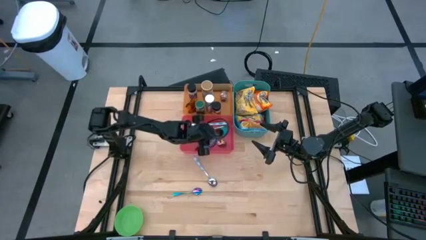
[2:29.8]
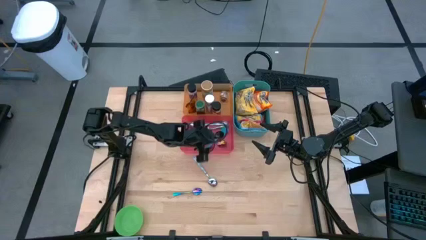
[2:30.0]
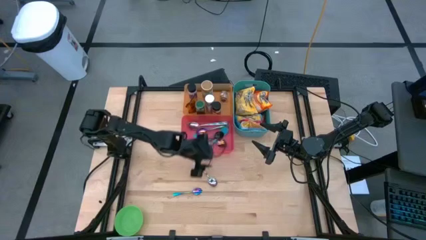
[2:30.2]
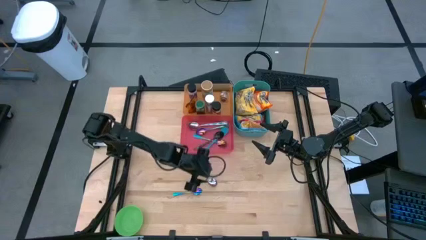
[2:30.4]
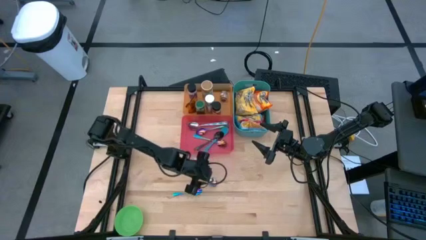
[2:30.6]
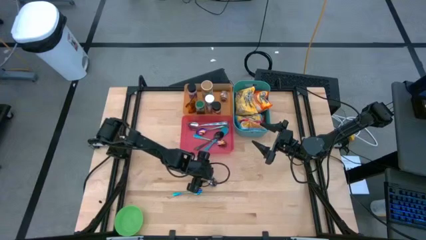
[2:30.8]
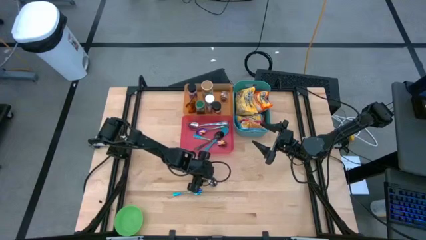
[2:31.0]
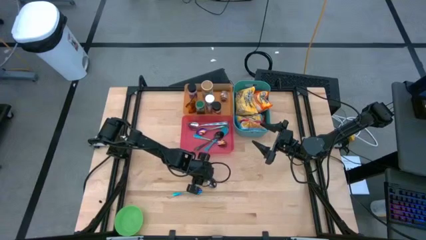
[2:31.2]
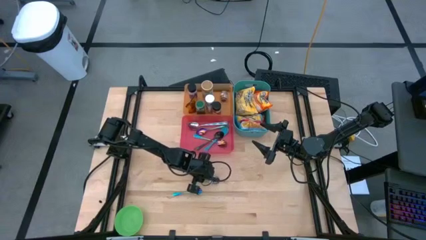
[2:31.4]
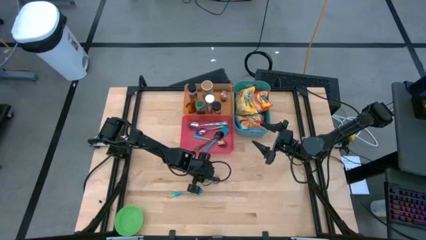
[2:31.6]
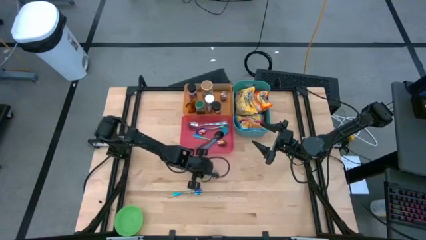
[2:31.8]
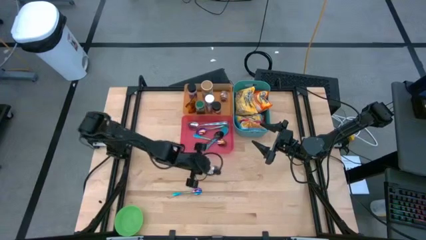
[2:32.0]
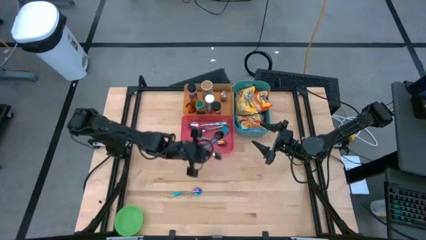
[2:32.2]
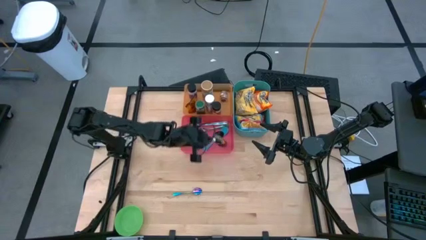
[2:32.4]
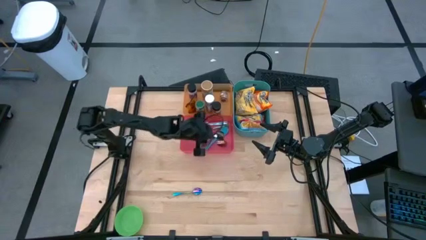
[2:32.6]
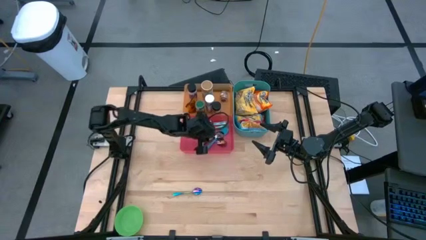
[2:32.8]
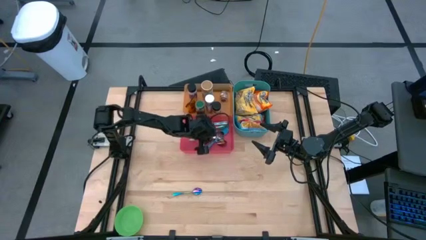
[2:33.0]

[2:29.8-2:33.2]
Task: Pick & Place Food Item
Put the blue patterned spoon into the red bin

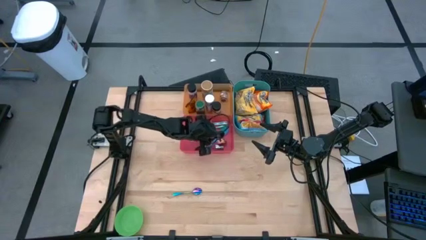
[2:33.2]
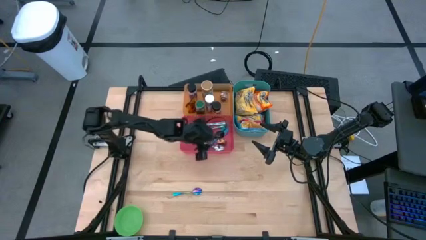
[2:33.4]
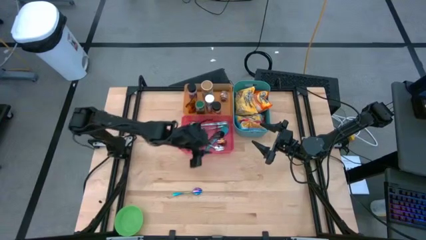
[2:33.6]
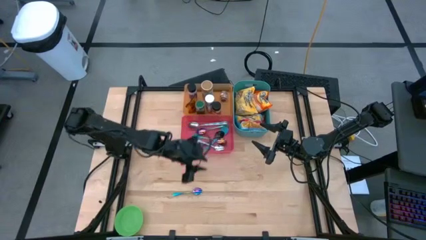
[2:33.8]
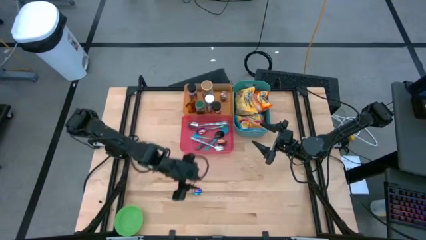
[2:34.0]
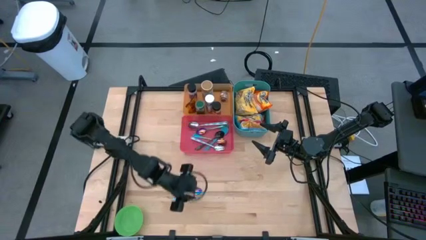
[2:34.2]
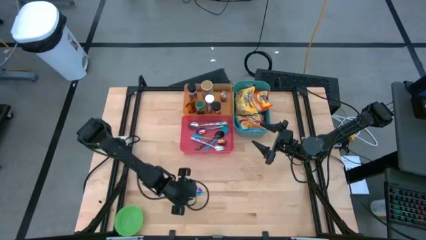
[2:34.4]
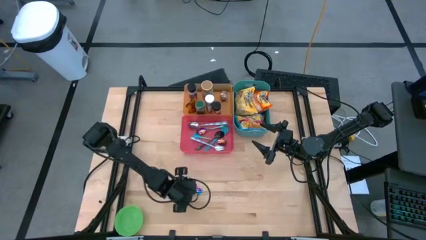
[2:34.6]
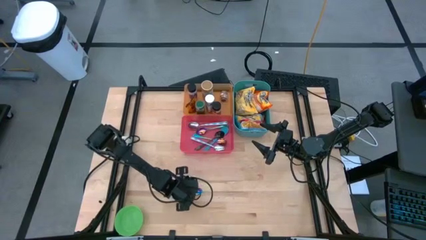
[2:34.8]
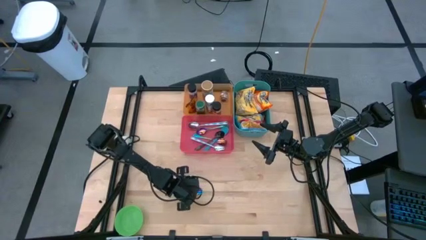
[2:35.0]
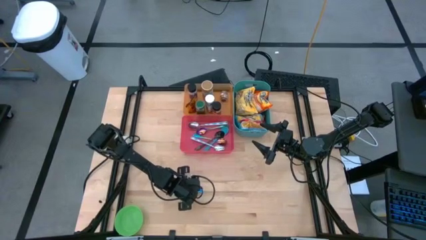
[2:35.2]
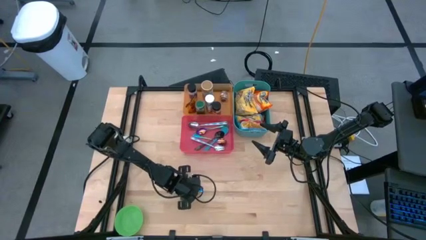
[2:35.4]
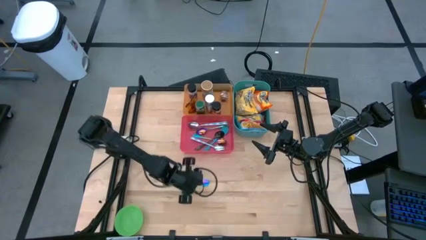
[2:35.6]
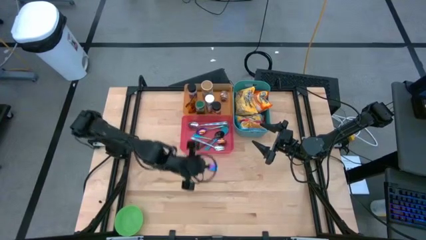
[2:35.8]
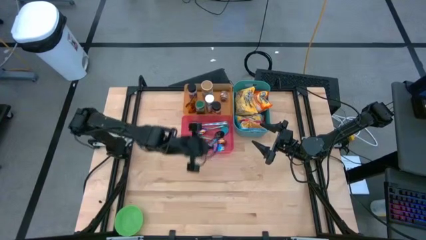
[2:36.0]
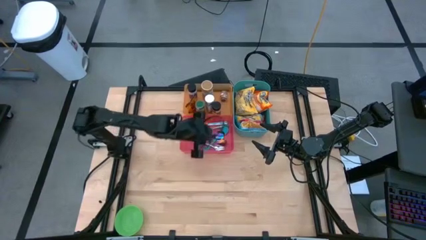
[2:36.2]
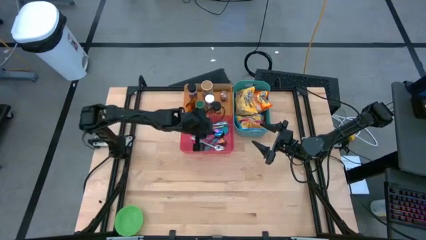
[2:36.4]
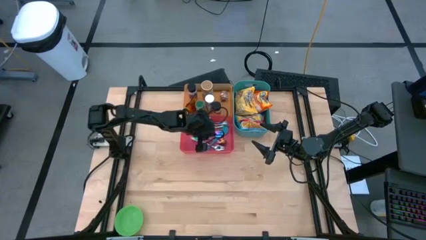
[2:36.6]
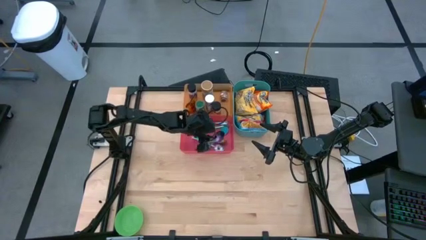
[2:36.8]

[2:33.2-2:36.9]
Put the blue spoon into the red bin

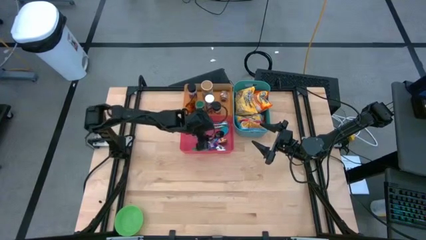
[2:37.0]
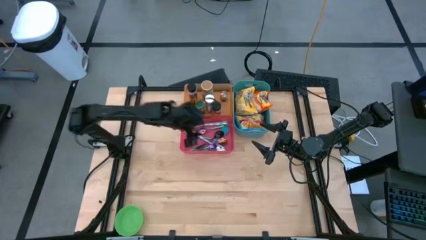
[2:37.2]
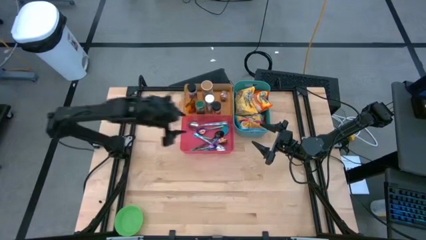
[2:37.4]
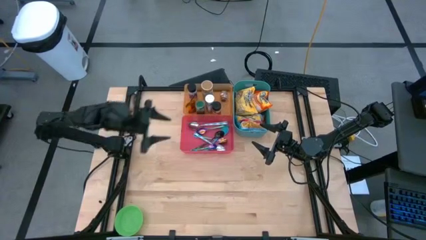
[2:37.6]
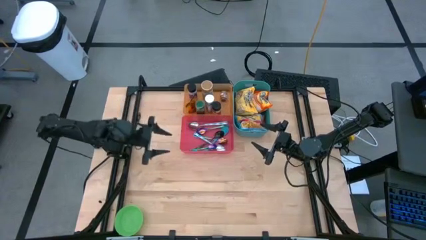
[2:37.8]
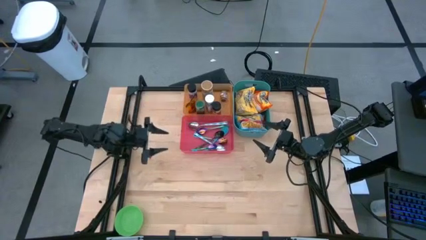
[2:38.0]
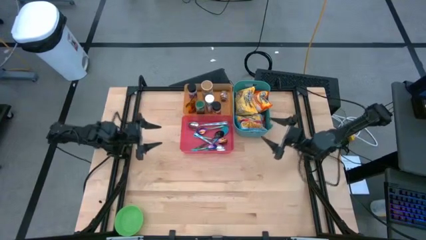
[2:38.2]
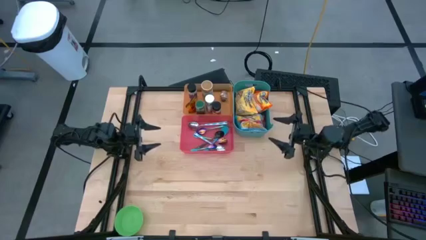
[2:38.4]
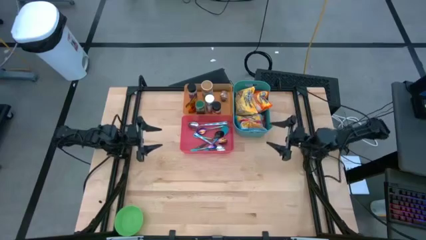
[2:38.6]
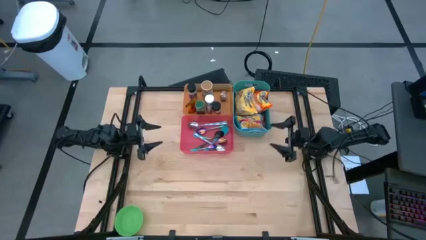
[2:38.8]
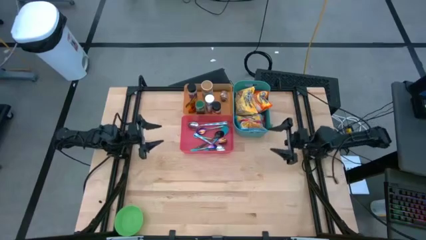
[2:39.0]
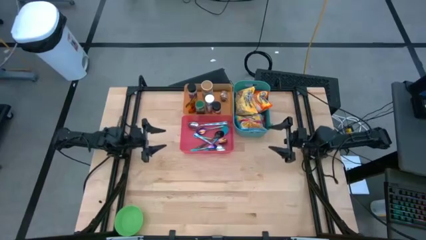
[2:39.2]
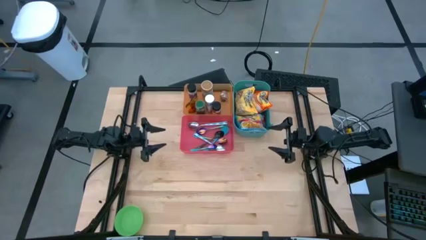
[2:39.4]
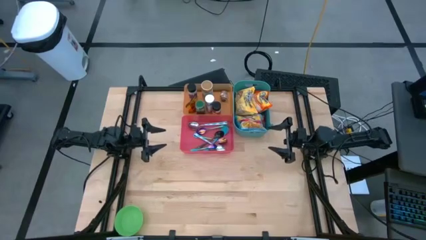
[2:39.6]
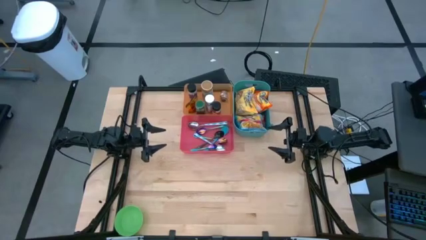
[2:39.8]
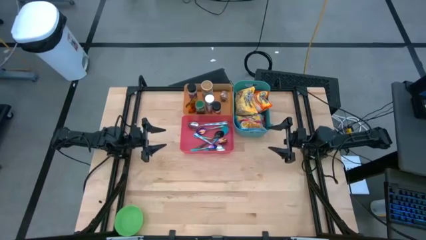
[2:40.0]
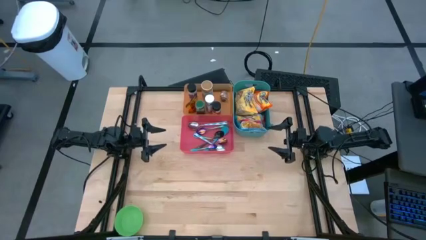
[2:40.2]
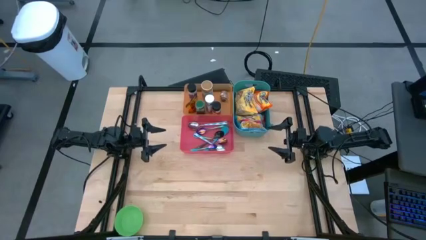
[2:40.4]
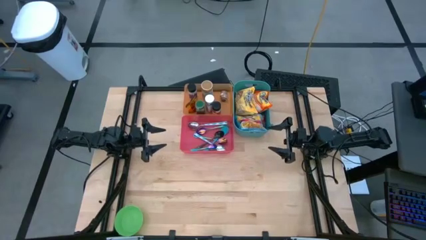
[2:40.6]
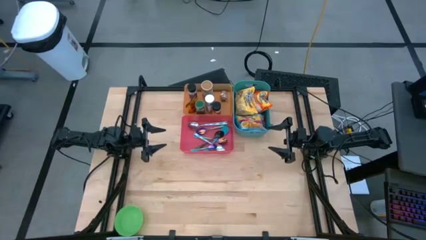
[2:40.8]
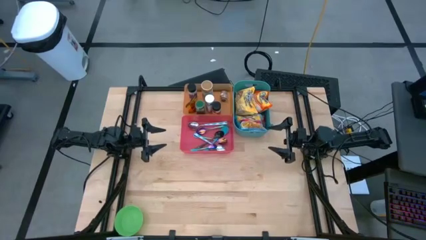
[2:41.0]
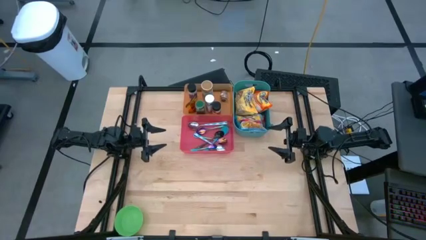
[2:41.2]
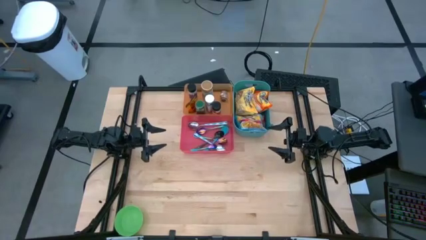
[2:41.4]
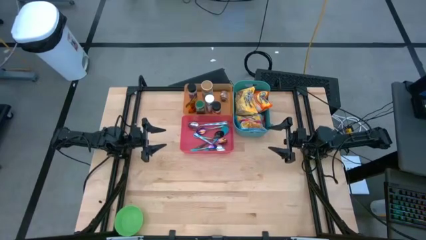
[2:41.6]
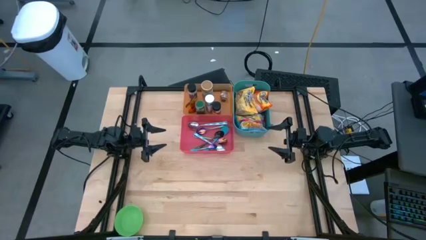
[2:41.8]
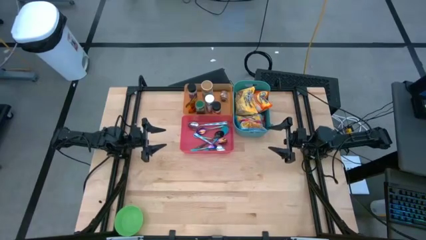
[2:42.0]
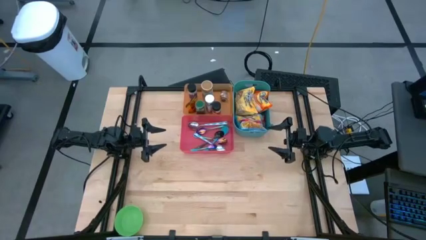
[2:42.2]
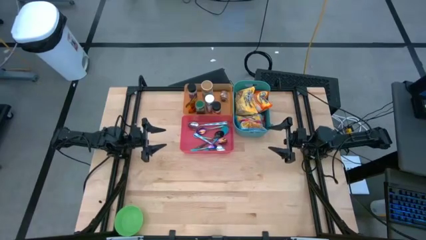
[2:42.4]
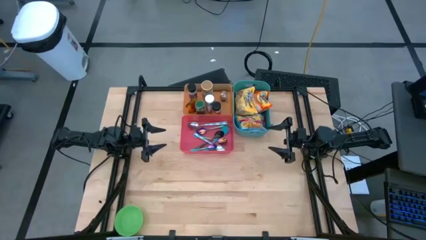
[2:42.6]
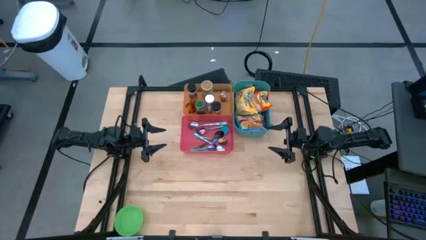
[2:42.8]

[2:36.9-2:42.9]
Return to Home Position

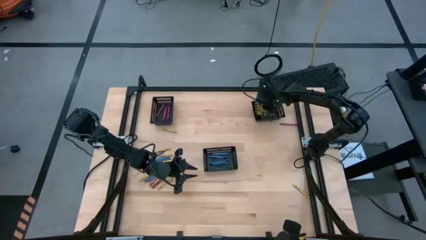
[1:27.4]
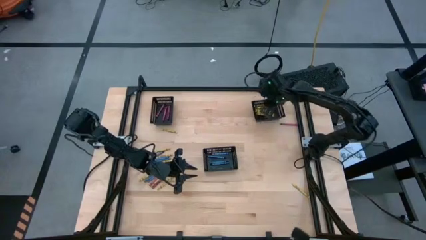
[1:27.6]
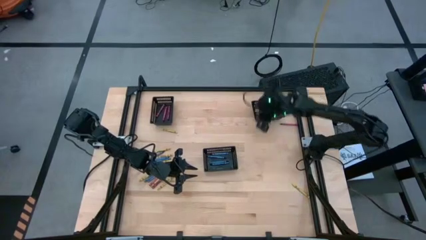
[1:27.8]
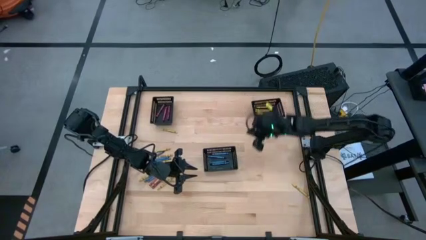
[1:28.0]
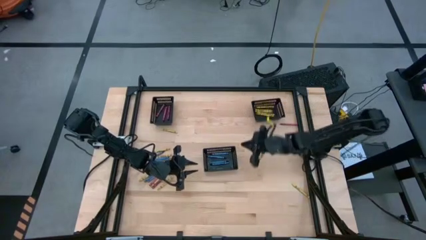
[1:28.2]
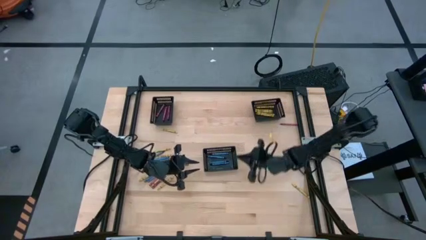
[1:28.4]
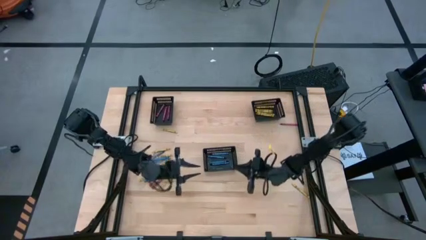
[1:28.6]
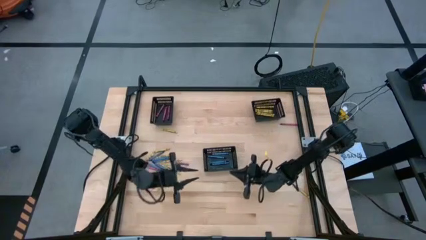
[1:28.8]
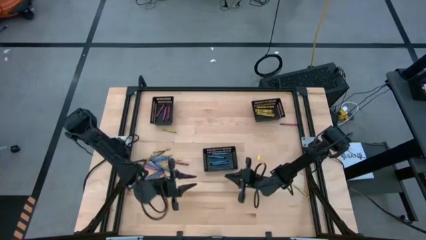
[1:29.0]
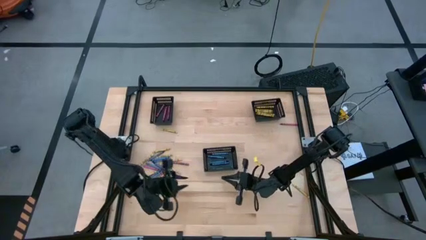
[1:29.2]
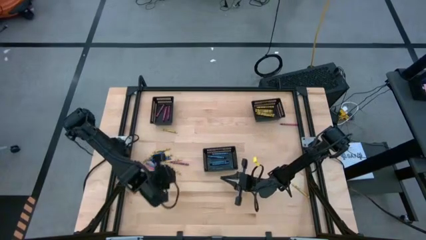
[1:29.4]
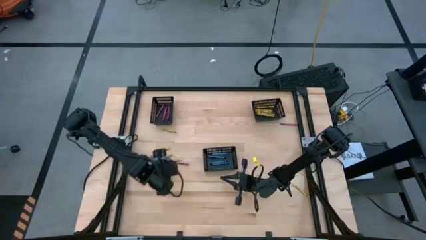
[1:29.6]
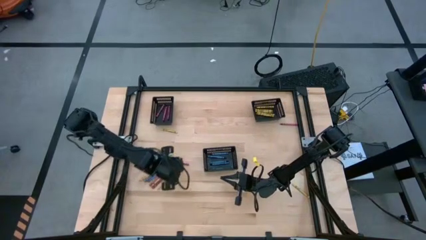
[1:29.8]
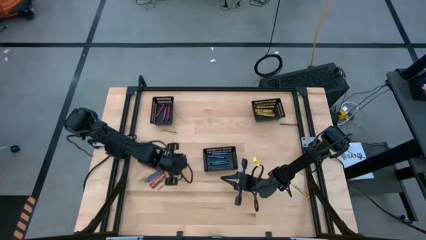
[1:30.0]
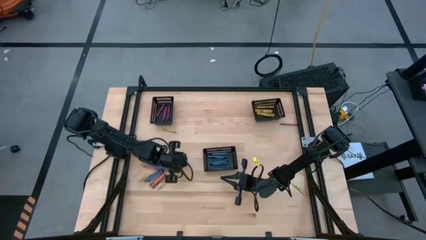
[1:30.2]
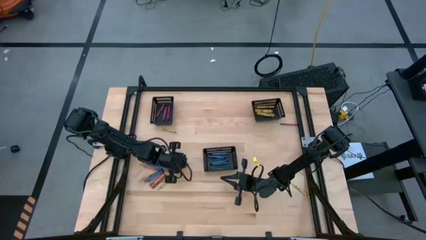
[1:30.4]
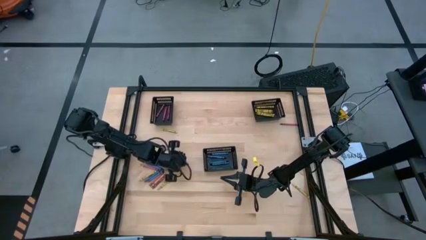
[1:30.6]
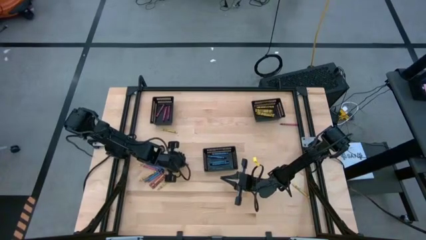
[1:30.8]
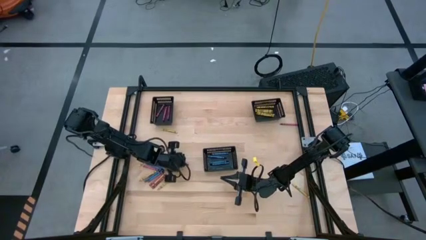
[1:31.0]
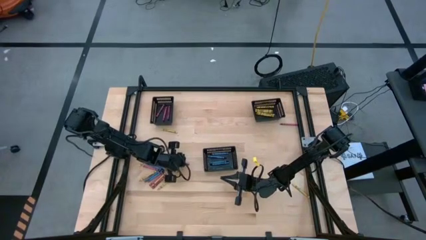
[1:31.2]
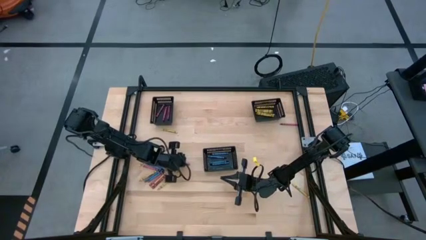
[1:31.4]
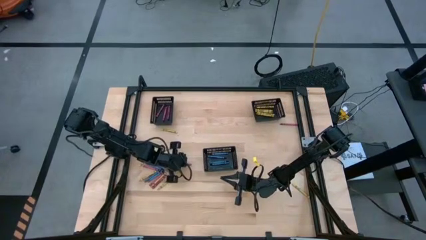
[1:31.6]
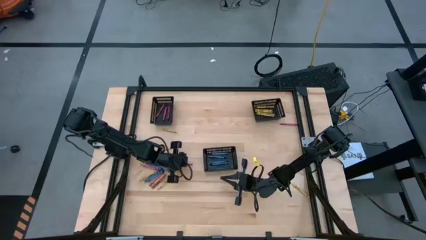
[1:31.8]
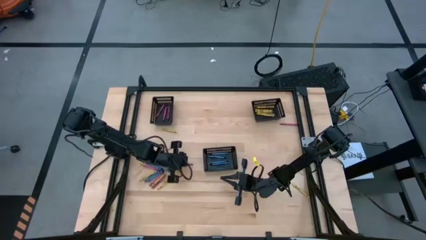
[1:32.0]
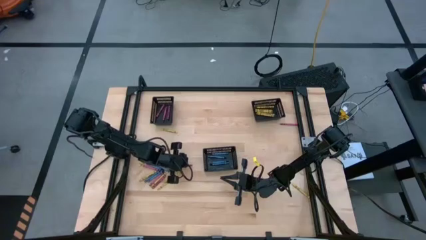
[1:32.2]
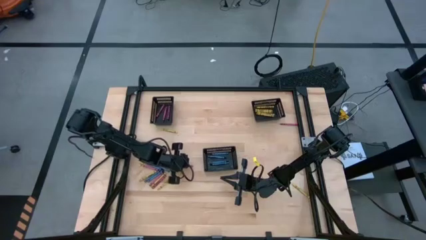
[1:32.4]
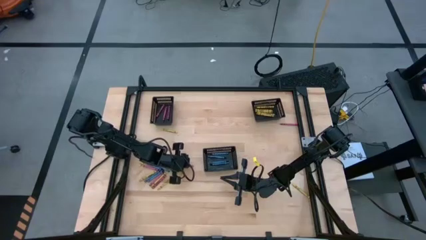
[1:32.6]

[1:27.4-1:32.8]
Task: Sort crayons
Put the pink crayon into the top left black bin
